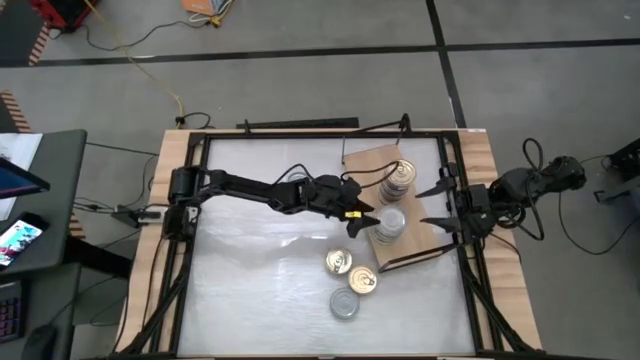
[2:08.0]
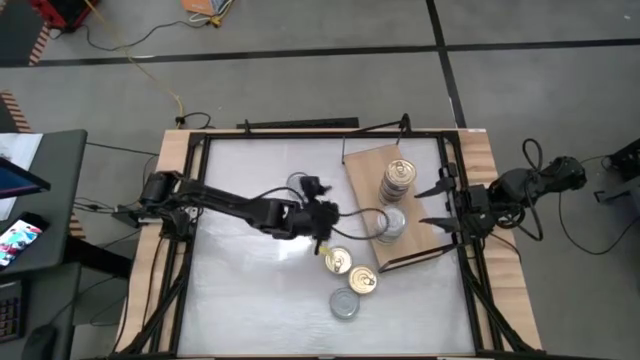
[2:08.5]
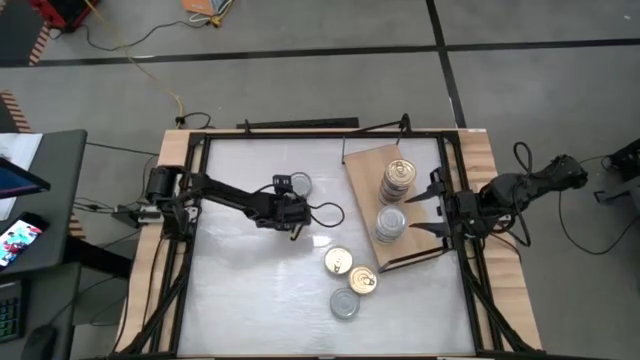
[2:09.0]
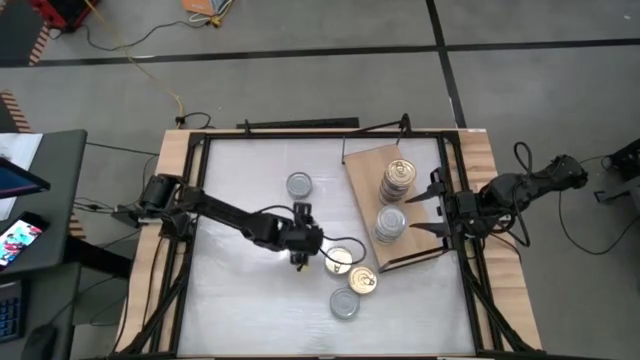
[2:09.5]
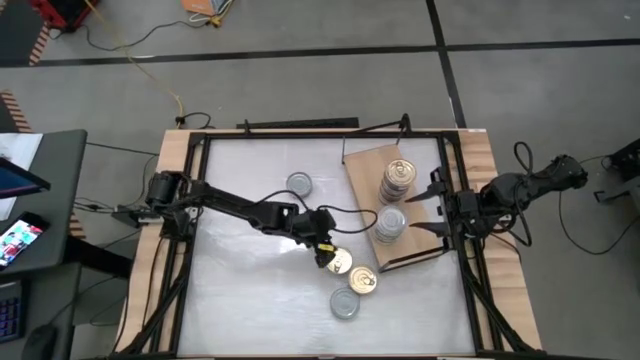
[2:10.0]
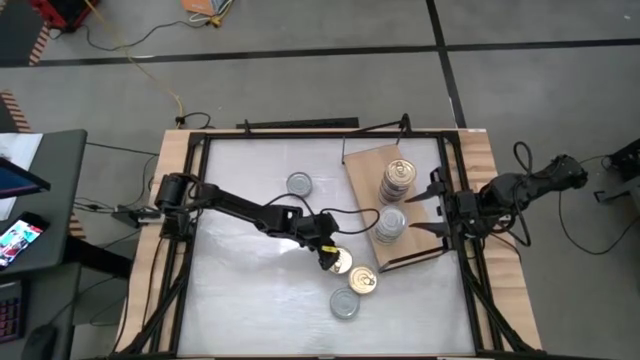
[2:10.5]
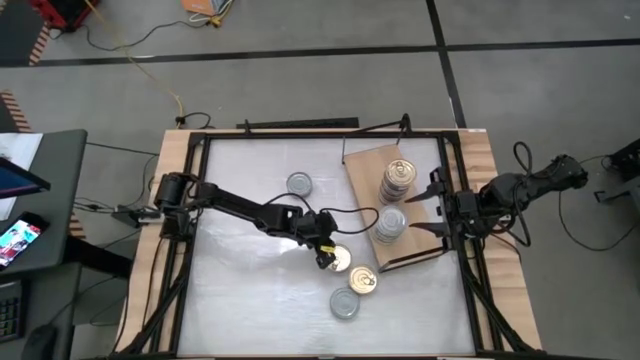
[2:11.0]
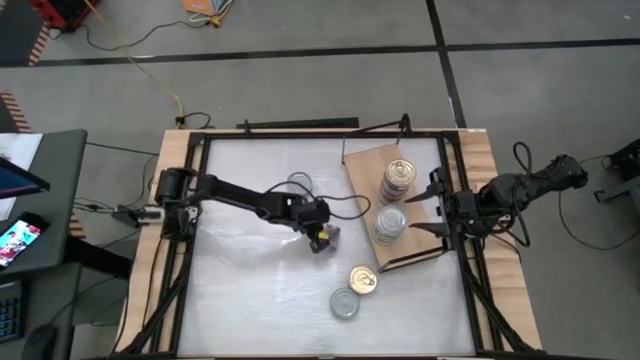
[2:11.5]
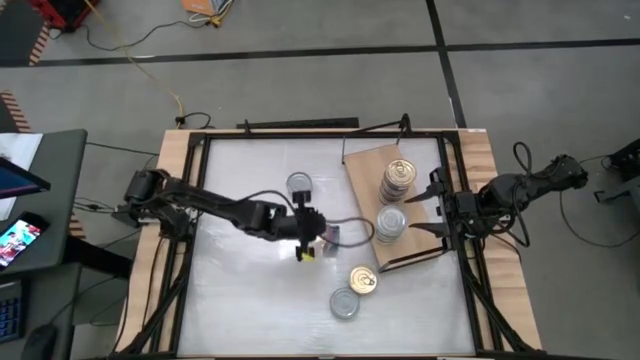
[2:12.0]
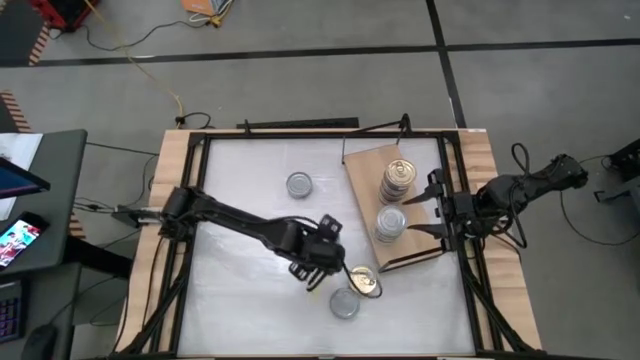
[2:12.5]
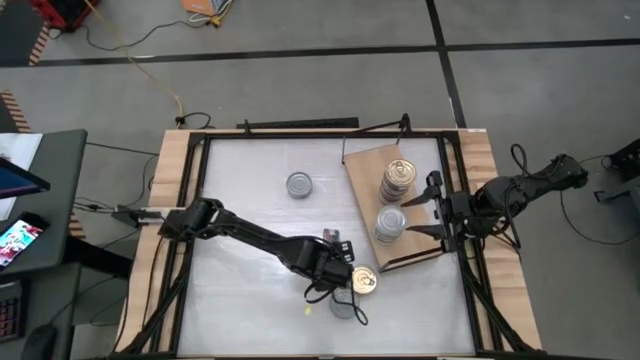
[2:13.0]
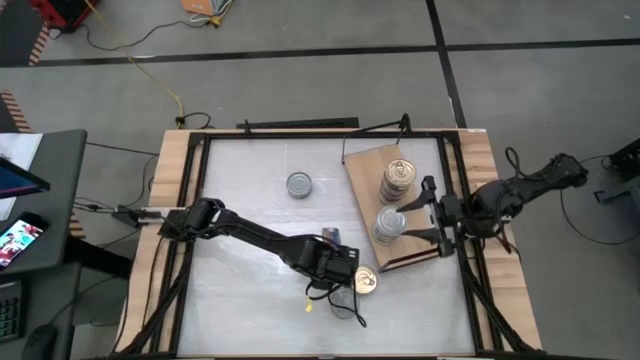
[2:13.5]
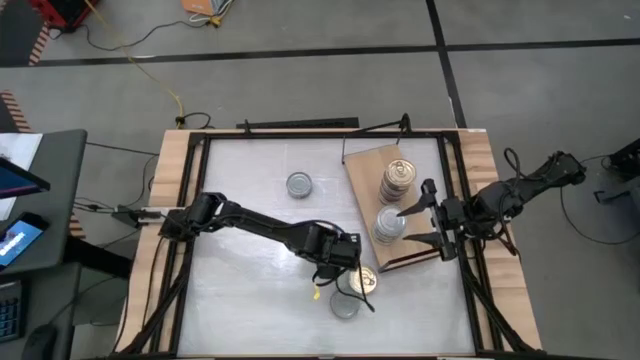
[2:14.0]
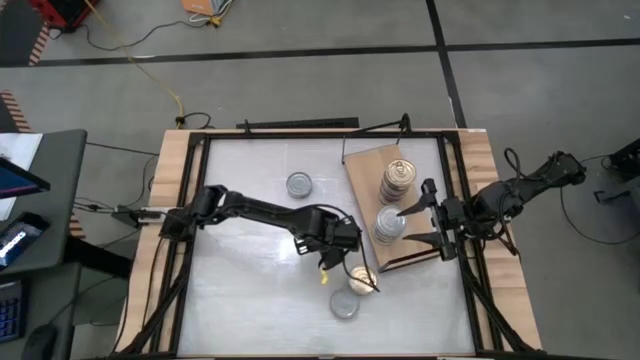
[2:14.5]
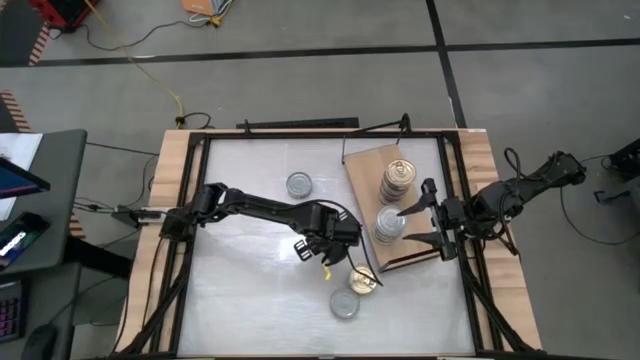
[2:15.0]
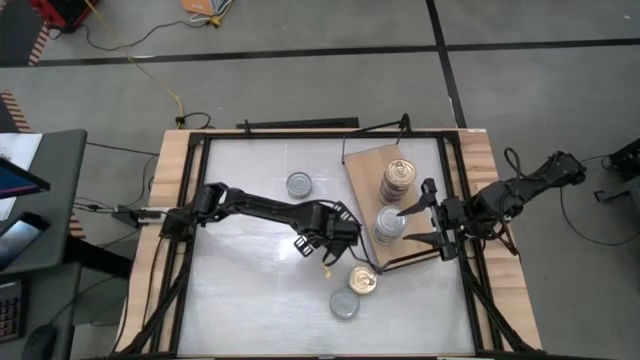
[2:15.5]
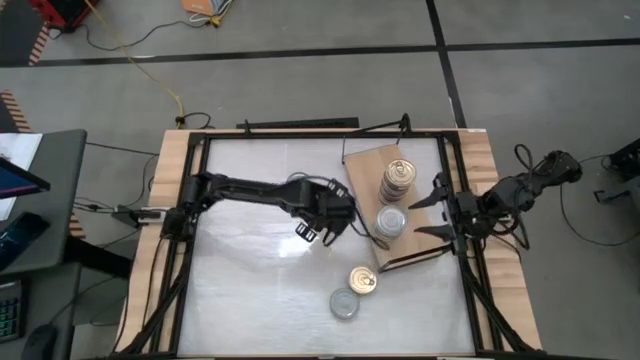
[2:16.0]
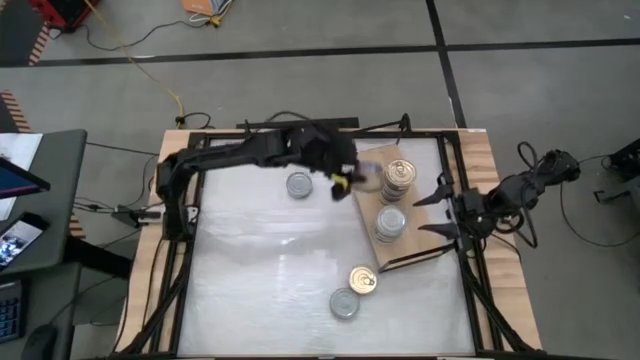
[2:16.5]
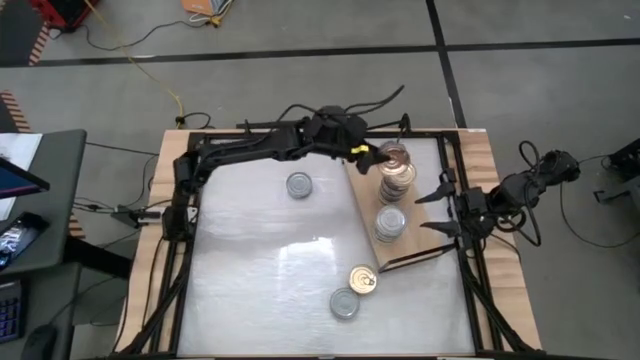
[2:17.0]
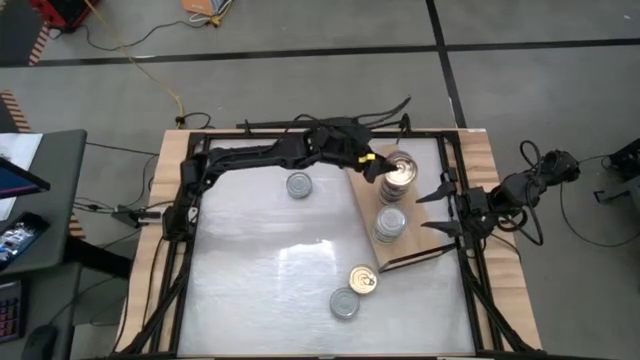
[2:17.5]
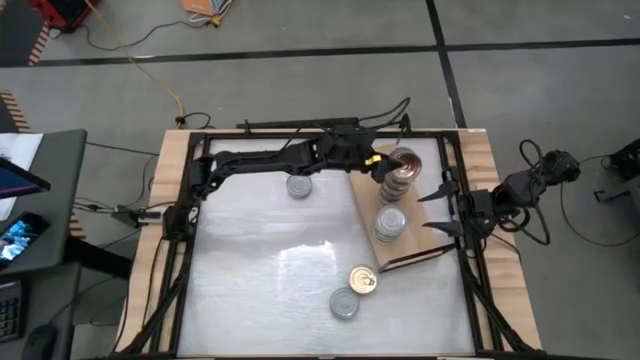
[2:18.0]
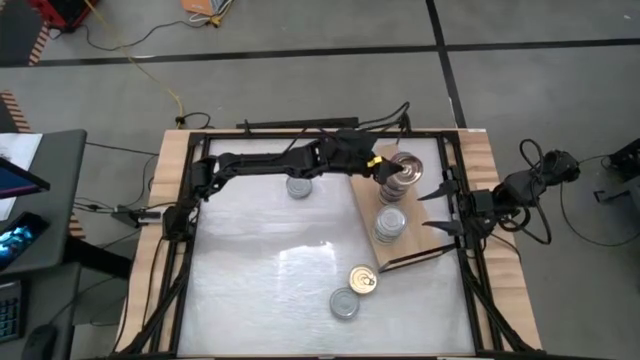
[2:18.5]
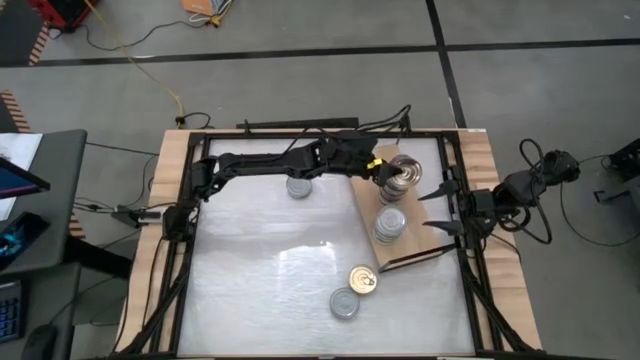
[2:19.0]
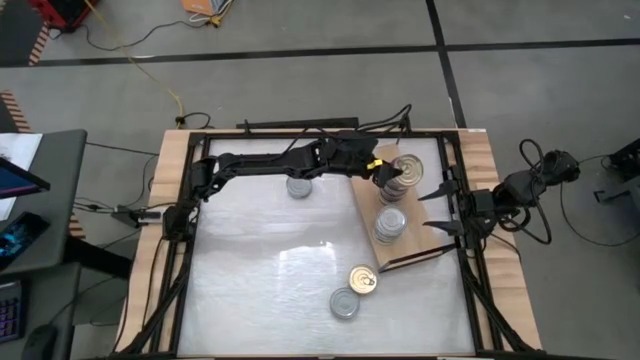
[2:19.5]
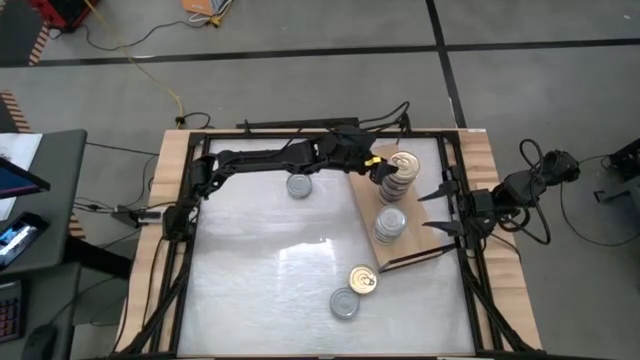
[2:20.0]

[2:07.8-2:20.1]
Task: Stack canned seafood by type on shelf
Stack the blue tuna can on top of the other blue tuna can on the shelf

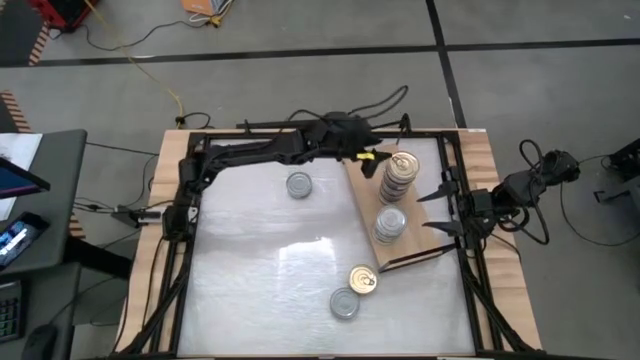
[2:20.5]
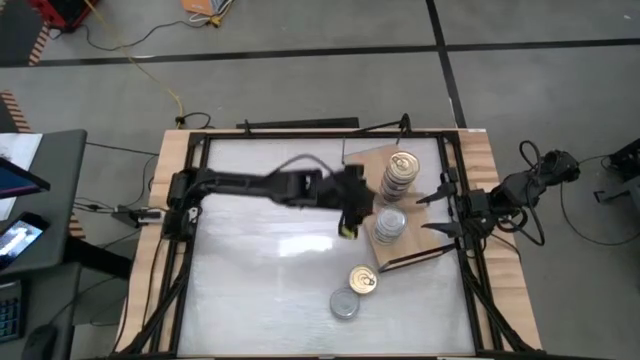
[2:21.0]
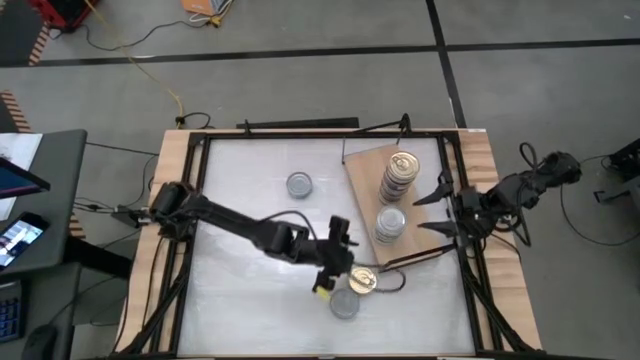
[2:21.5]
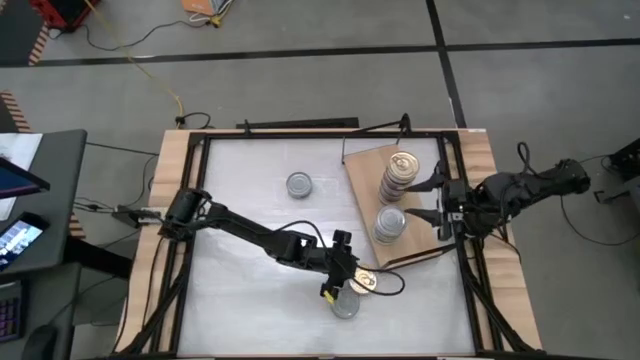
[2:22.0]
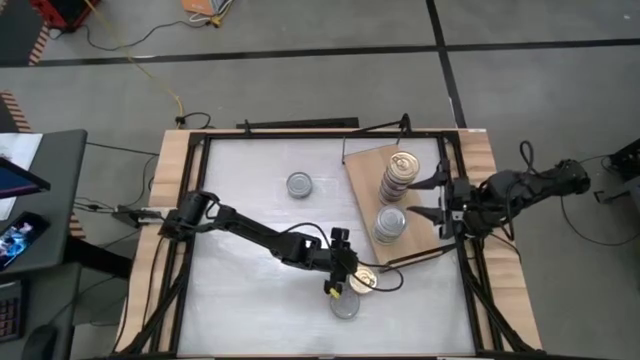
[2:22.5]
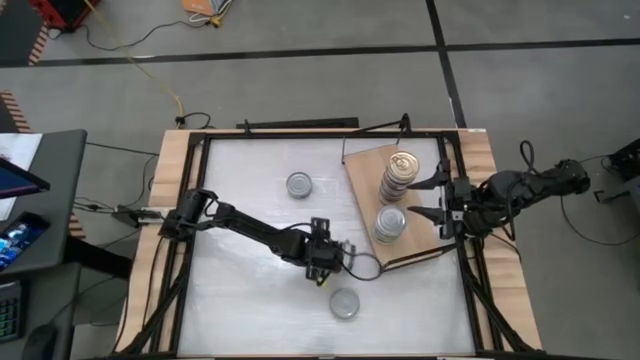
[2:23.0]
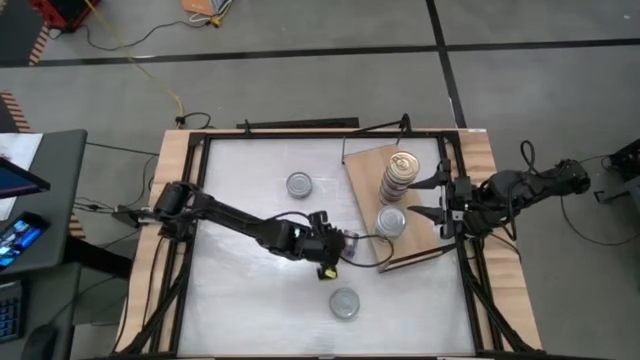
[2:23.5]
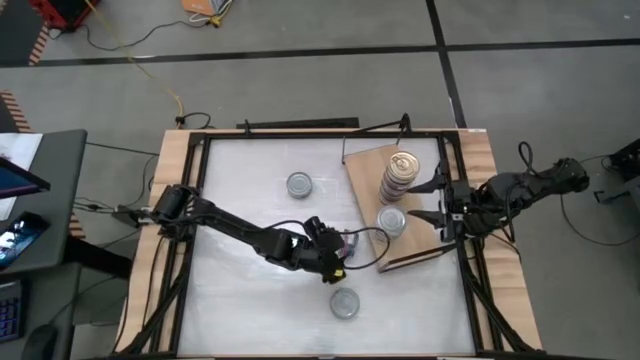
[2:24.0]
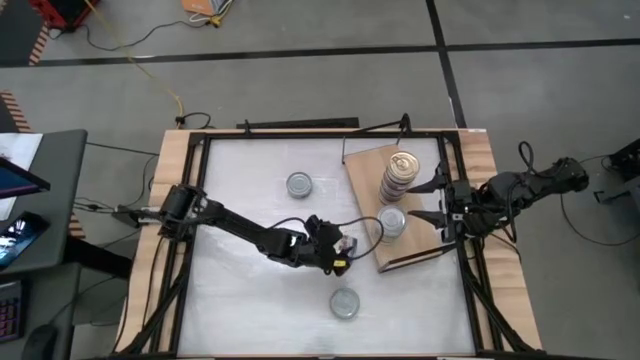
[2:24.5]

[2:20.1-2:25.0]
Stack the blue tuna can on top of the other blue tuna can on the shelf

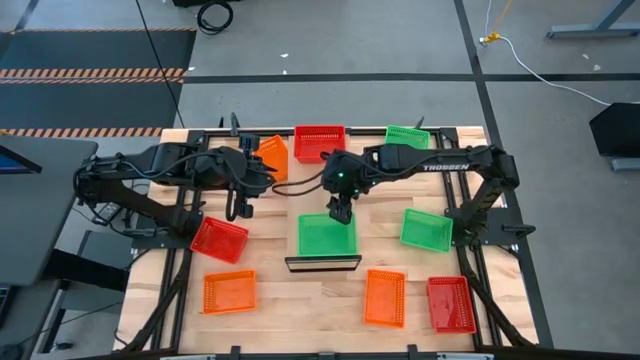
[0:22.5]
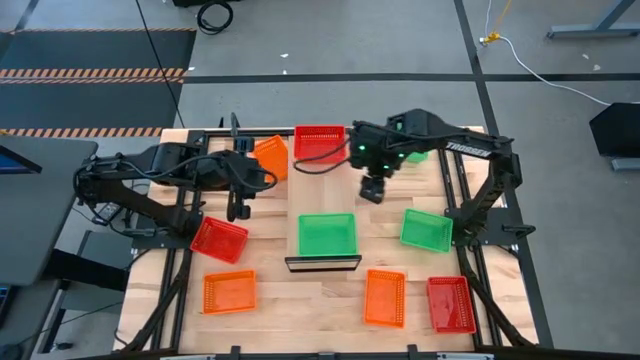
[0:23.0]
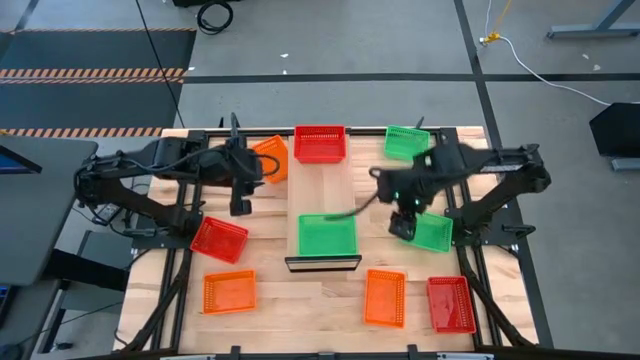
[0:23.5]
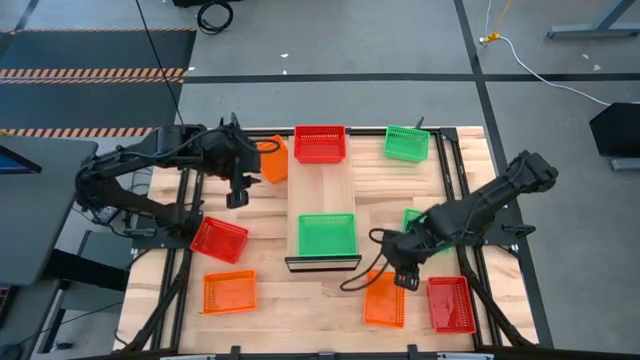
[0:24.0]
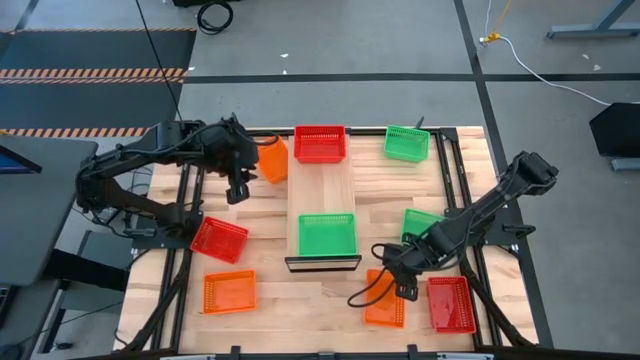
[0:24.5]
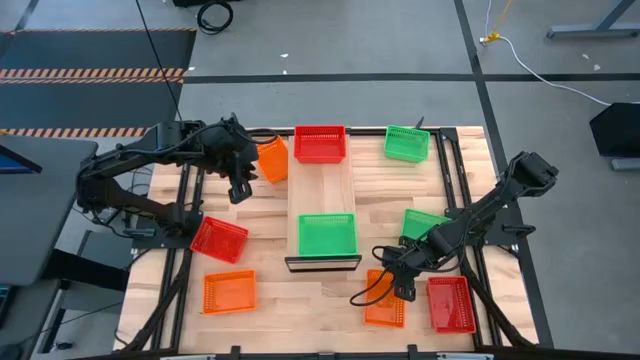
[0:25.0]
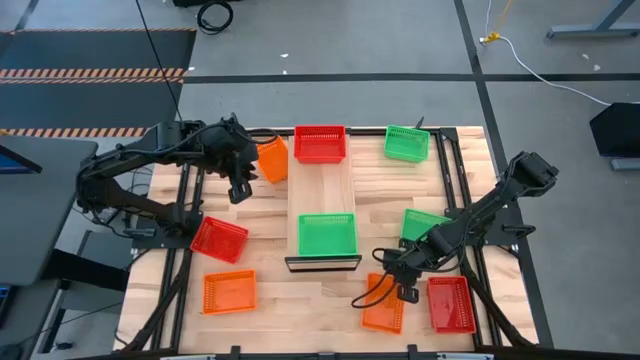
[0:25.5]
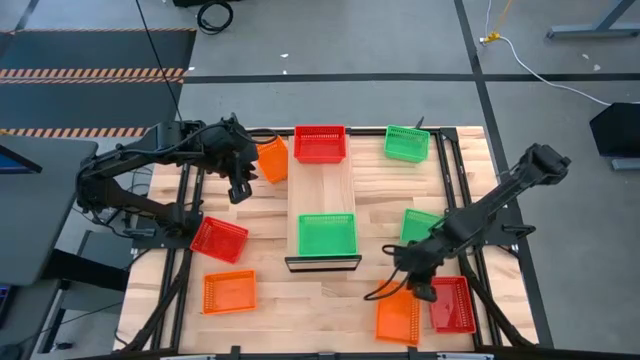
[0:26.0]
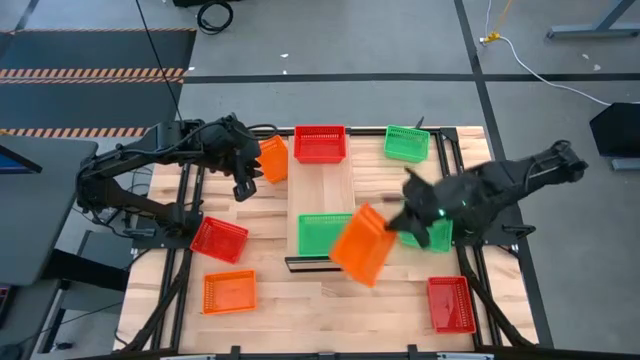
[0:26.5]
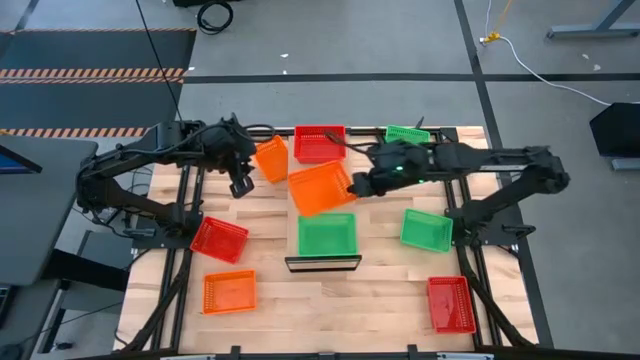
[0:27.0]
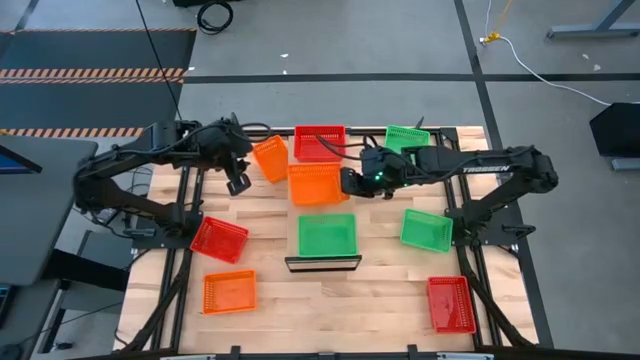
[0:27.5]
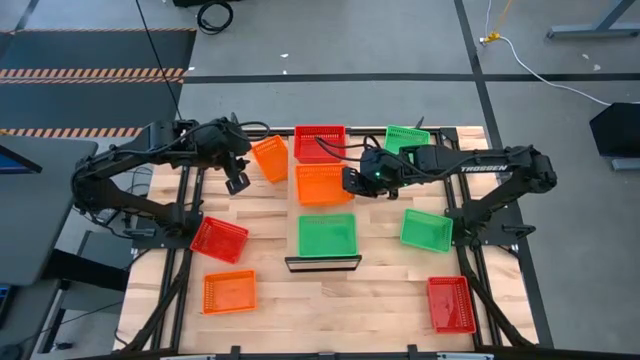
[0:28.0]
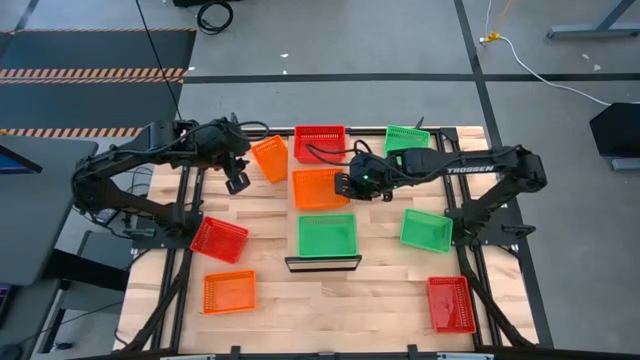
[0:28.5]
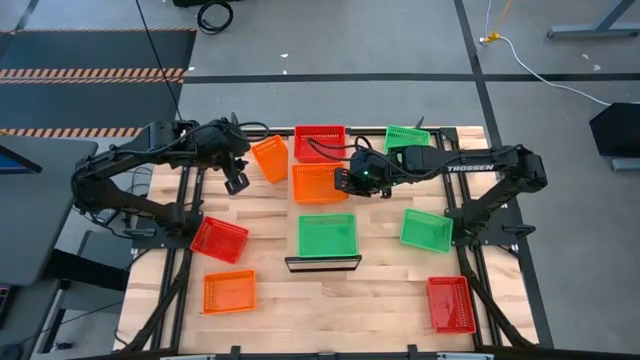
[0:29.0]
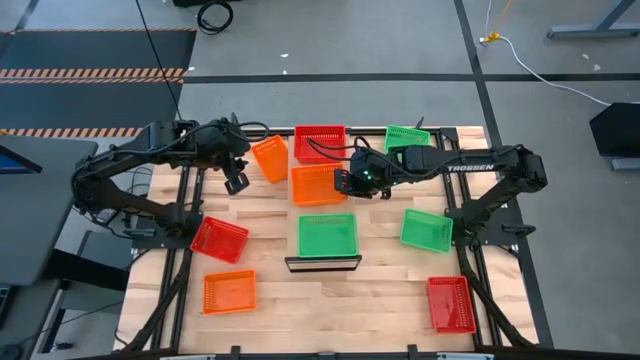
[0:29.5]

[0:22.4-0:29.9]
Task: Stack baskets on shelf by color
Put the bottom right orange basket on the shelf
